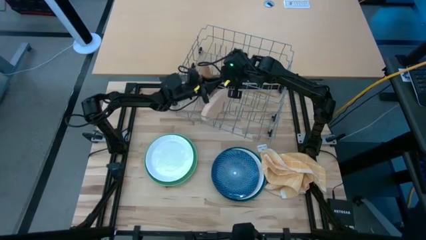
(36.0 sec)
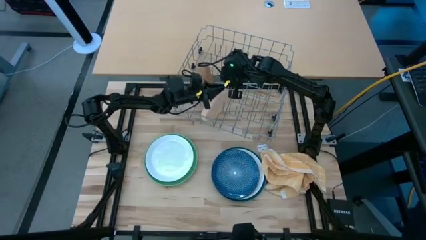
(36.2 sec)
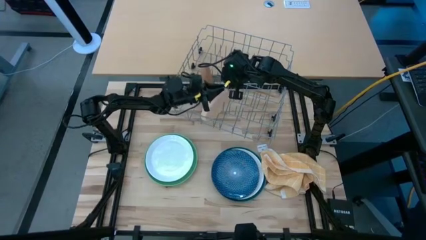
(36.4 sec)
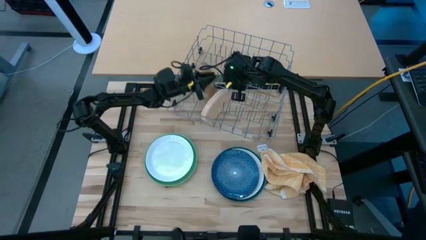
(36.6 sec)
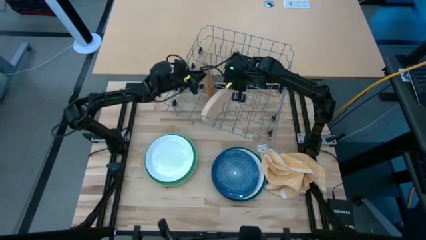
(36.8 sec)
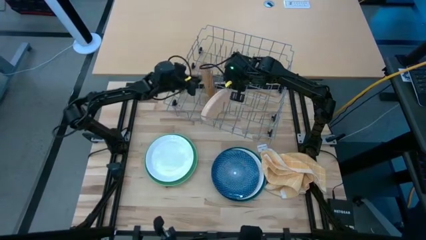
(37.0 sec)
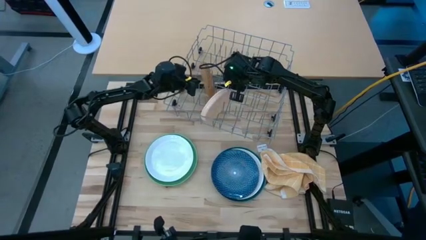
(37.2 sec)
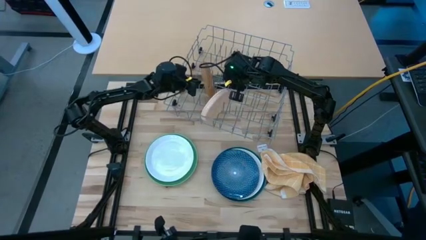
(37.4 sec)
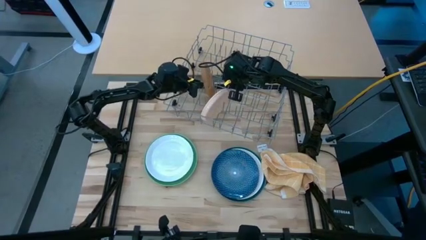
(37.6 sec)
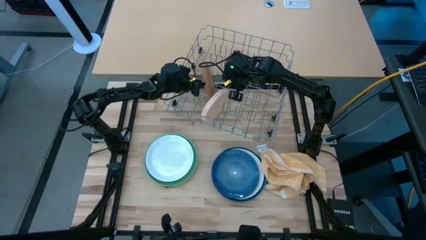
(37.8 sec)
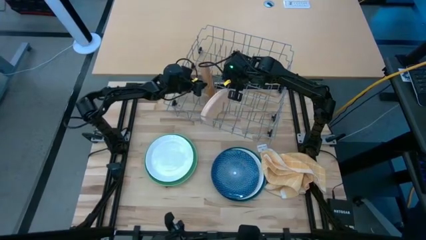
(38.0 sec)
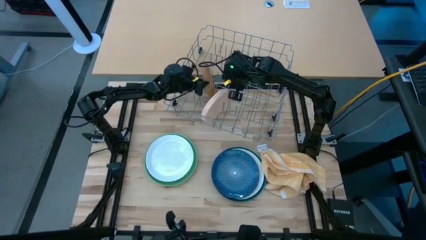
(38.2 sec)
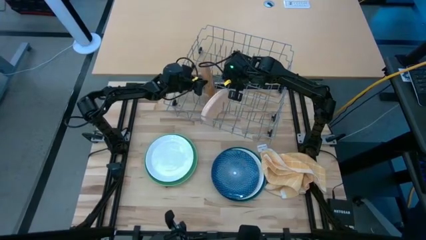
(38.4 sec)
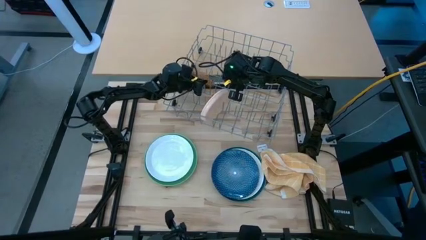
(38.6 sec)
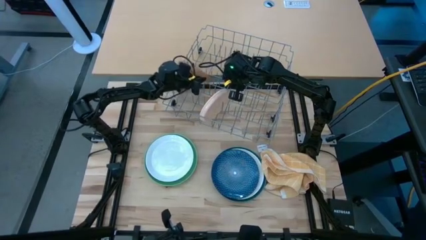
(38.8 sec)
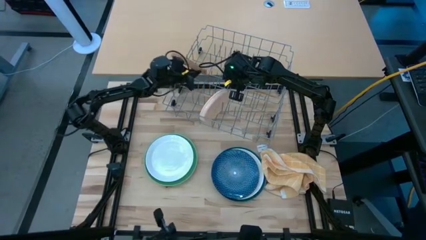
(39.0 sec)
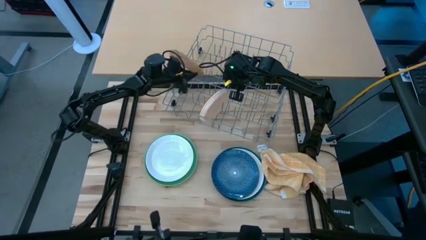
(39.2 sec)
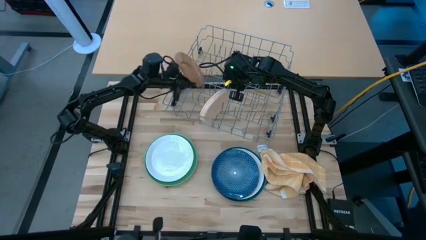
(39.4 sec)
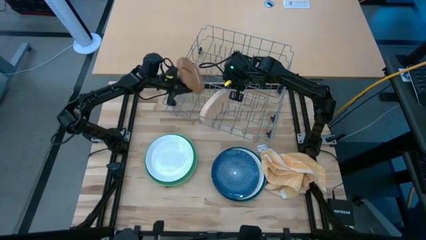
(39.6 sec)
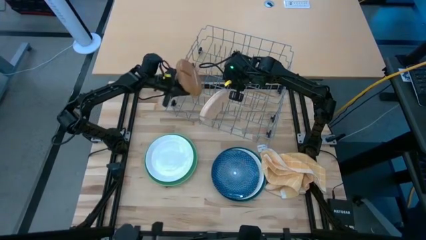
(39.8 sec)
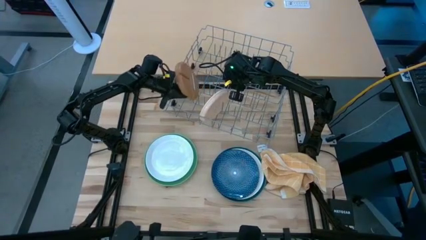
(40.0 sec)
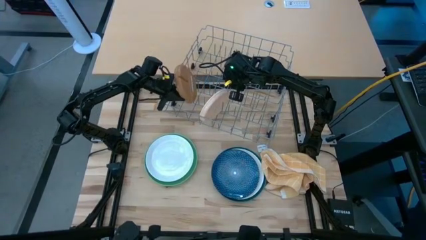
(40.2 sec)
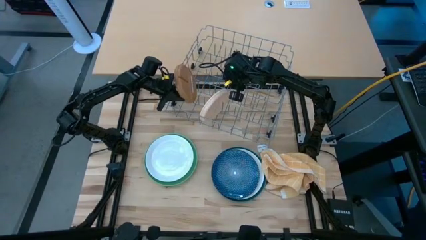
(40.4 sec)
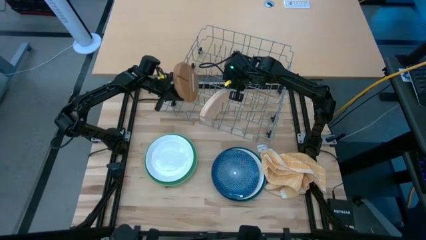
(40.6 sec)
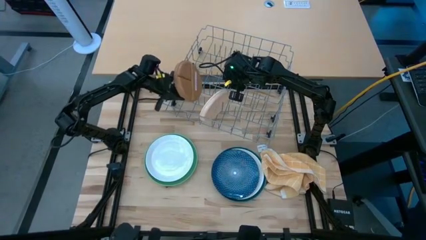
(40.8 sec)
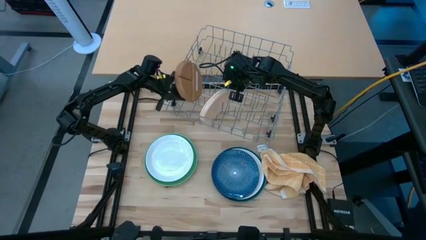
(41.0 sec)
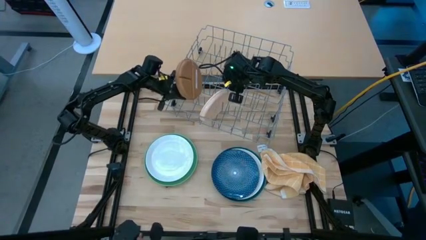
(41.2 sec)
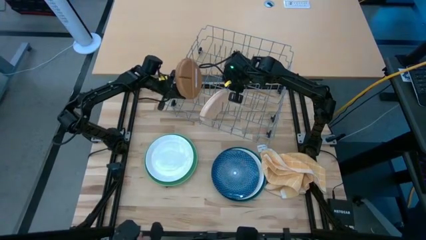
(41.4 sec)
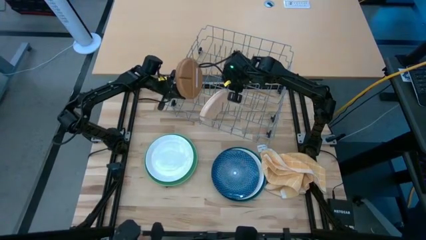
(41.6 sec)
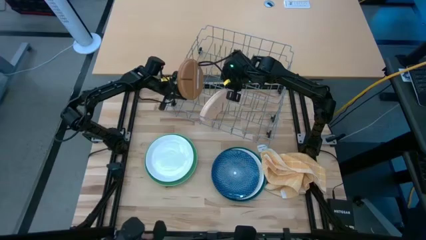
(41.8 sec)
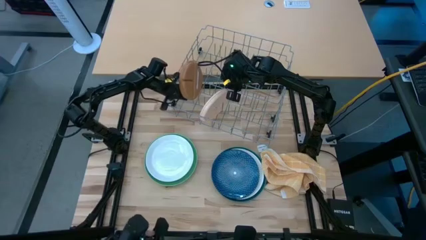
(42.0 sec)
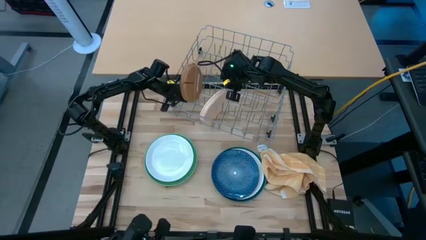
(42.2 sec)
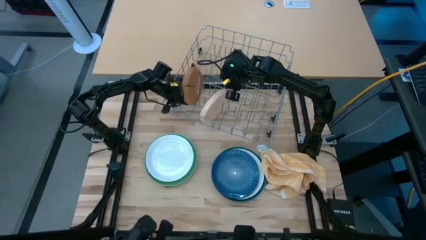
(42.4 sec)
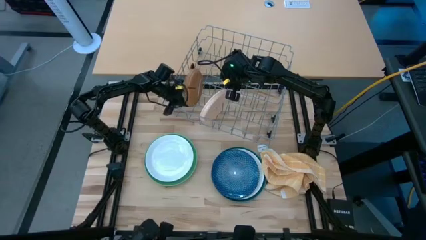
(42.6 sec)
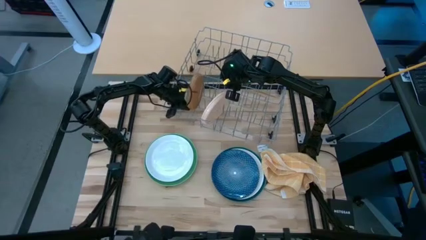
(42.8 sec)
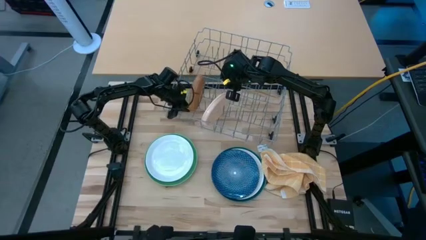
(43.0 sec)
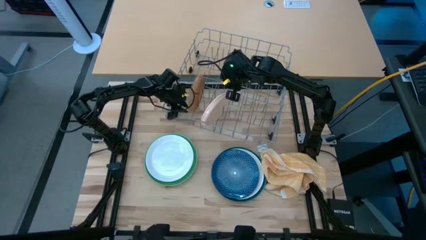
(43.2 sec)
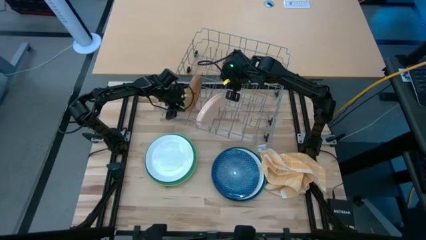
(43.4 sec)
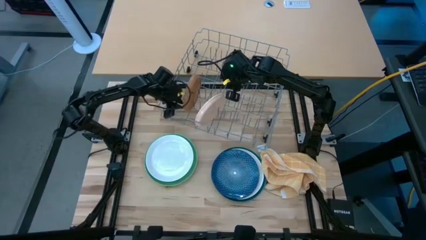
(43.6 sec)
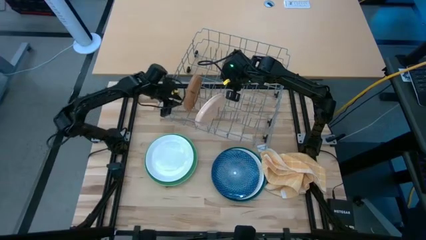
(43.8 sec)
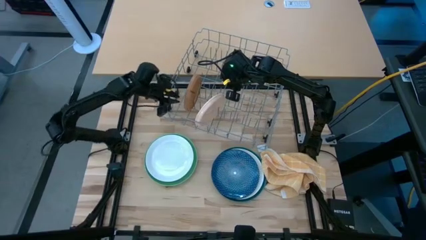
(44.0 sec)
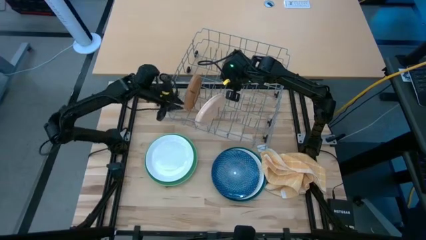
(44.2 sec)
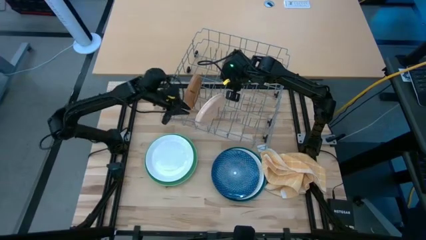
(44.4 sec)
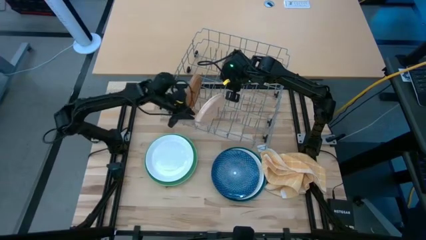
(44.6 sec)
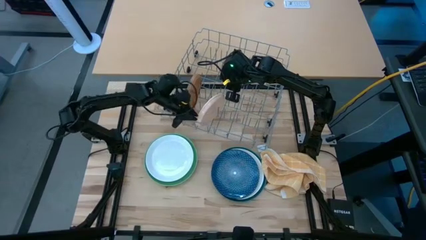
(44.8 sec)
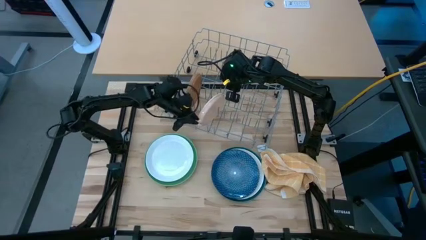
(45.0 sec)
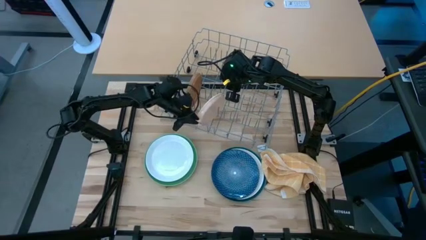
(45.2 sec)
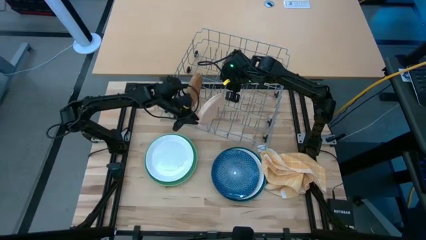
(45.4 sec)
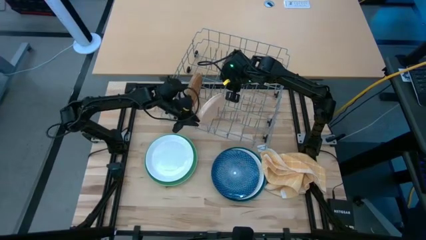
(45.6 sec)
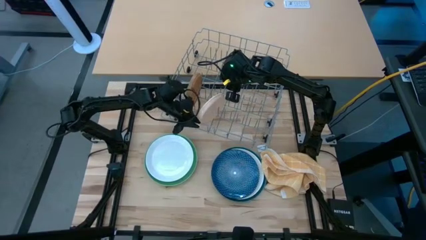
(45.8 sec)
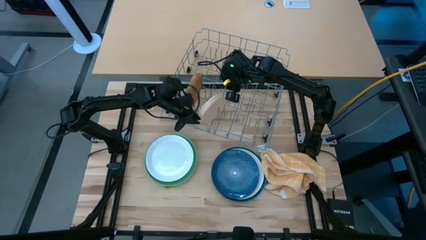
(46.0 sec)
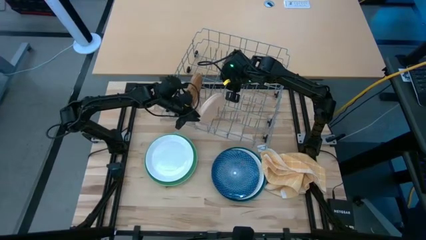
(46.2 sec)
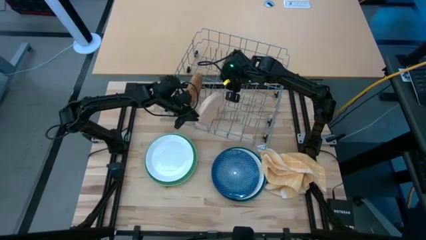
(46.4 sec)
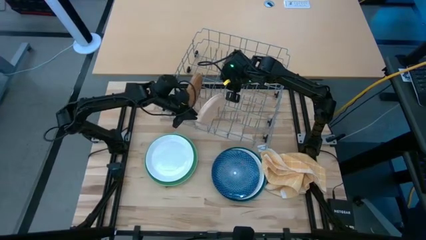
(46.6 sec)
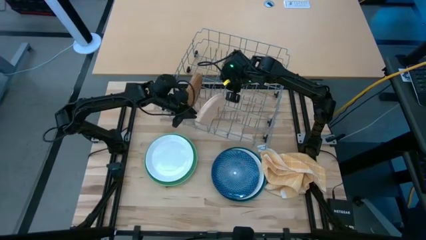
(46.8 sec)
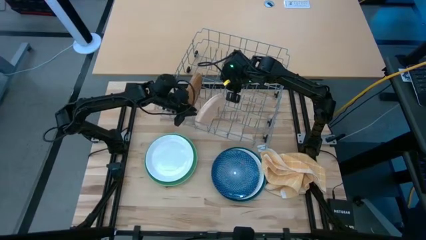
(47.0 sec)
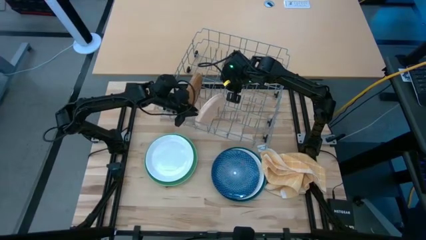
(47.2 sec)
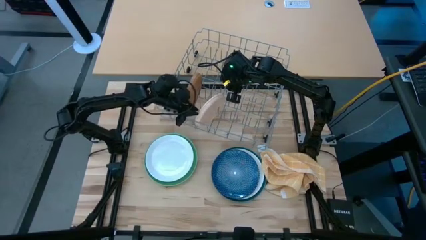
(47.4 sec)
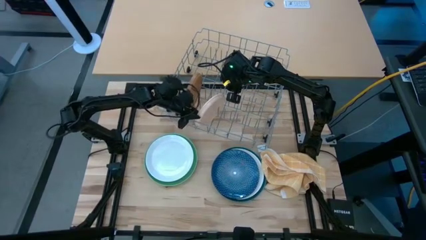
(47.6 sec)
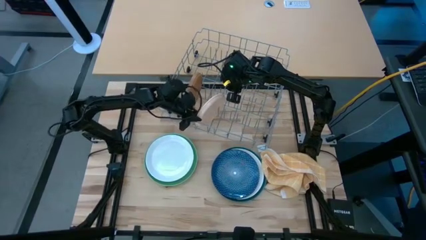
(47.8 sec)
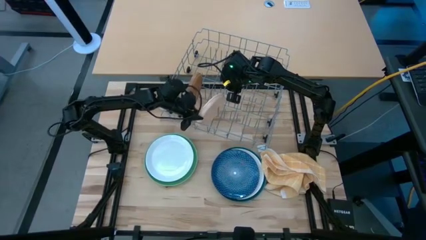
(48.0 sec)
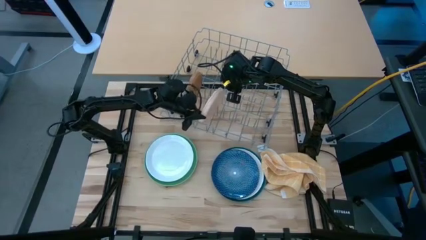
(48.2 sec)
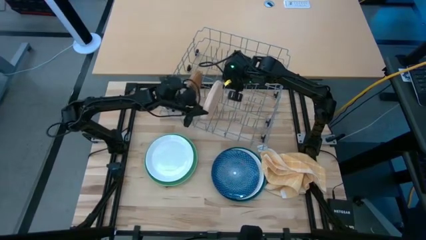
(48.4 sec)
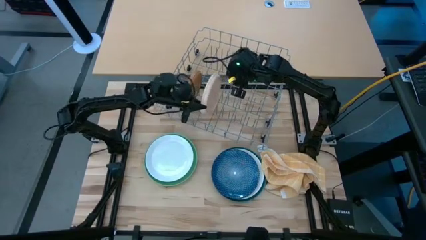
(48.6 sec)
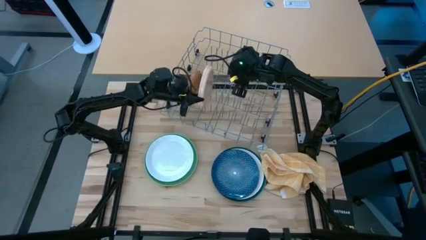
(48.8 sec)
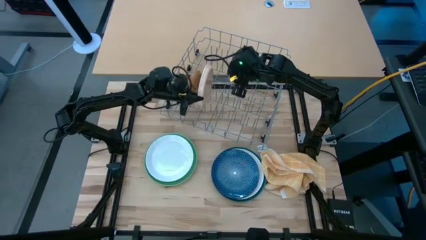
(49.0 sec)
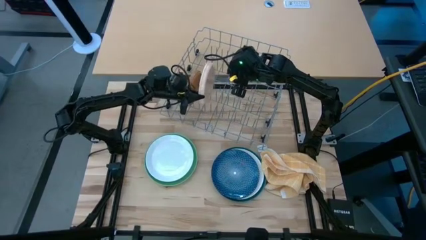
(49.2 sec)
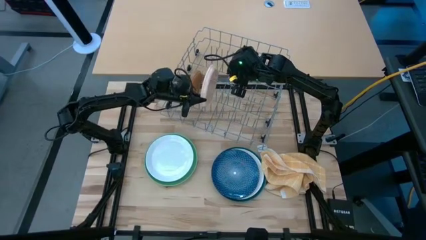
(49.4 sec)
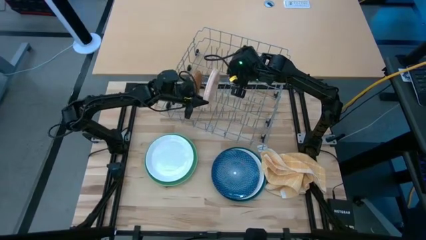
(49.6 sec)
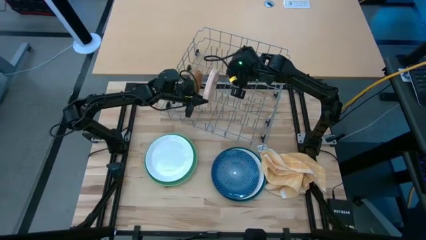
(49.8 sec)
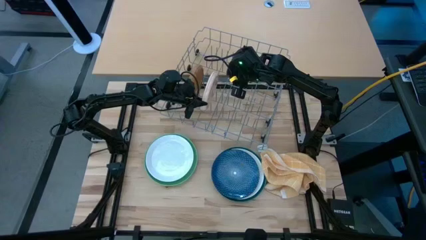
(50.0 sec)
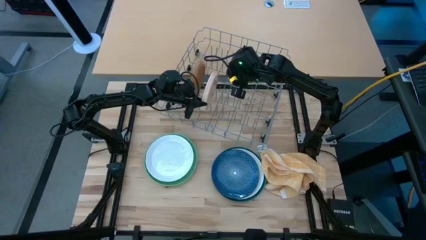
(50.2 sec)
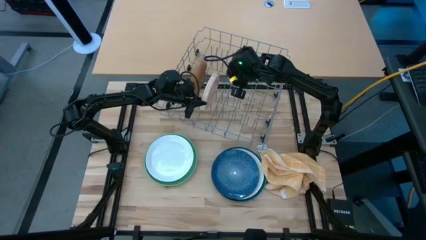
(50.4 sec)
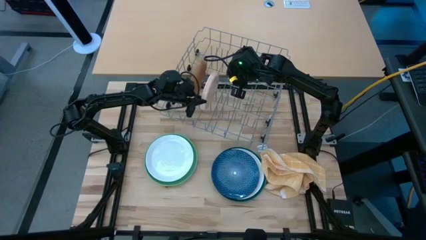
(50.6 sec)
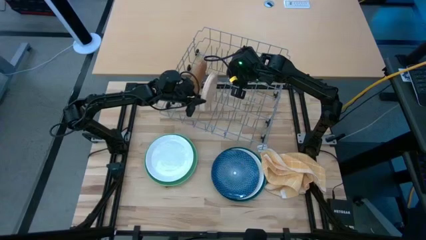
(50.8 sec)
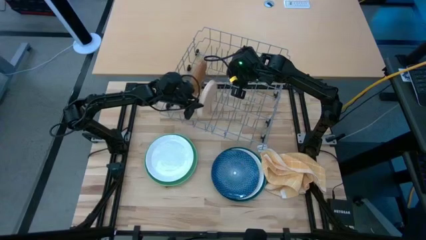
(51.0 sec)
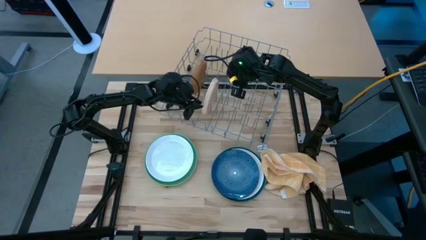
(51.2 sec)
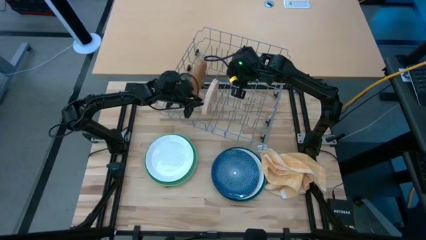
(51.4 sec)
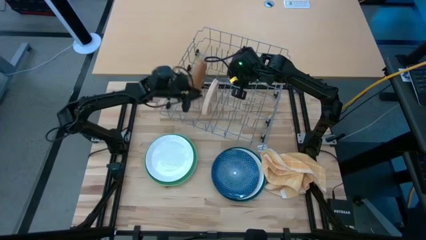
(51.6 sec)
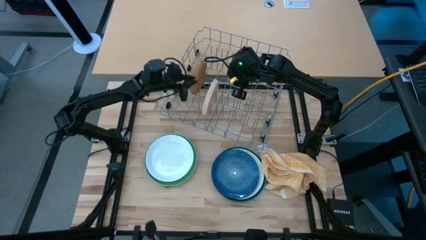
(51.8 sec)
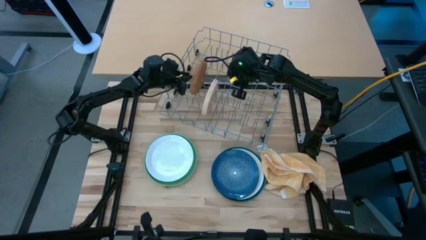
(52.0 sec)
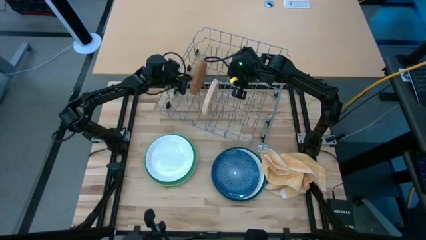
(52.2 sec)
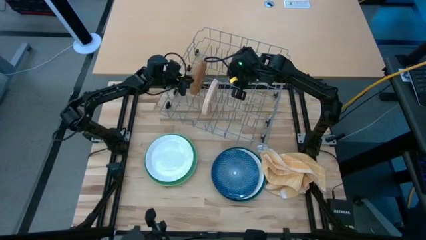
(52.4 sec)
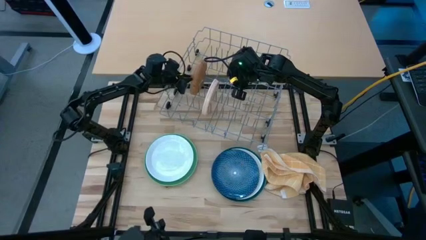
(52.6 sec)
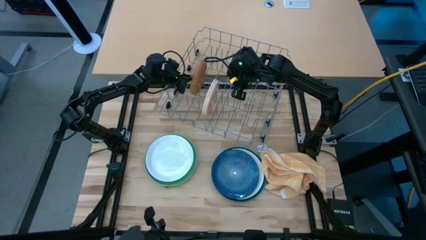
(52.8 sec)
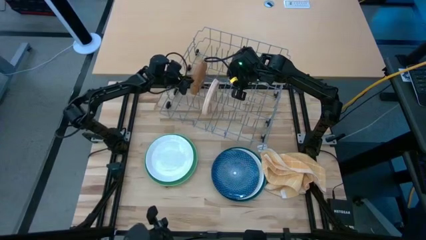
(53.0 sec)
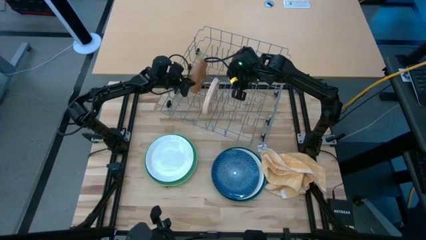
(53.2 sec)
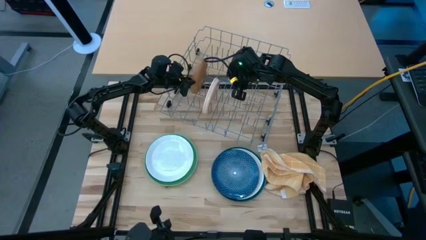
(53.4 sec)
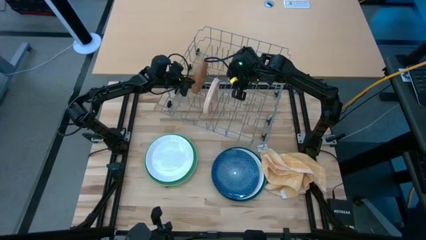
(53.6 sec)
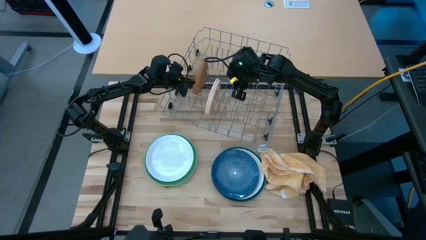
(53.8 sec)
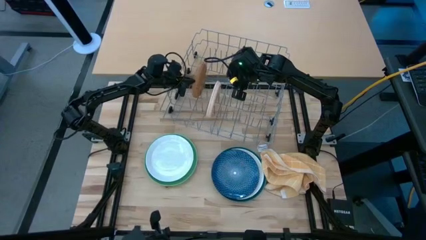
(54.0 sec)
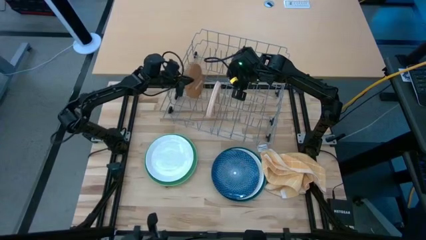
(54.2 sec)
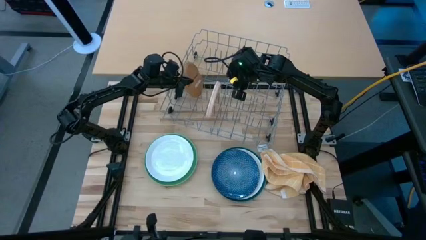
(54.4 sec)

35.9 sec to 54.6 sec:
Task: Sort dishes
Adjust the plates in the dish rack
